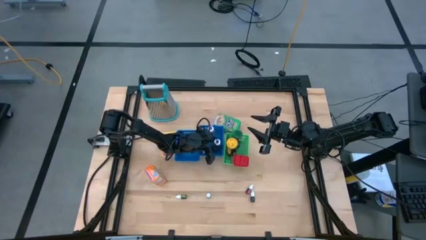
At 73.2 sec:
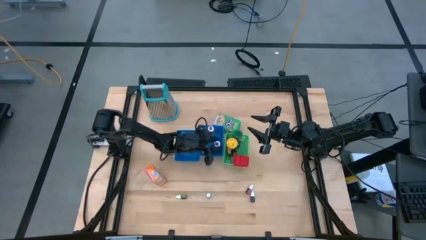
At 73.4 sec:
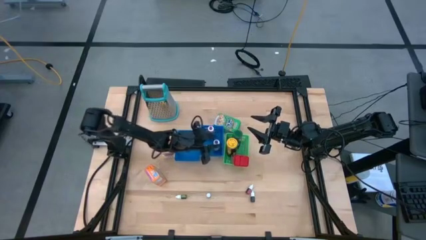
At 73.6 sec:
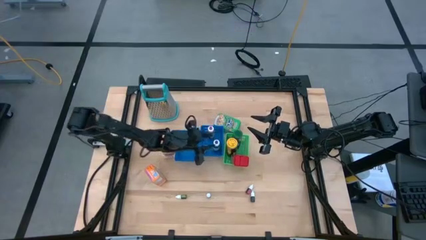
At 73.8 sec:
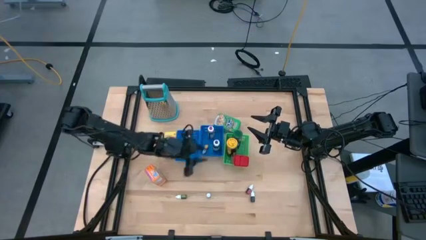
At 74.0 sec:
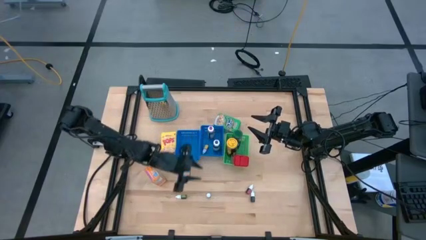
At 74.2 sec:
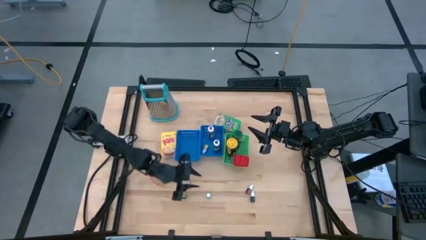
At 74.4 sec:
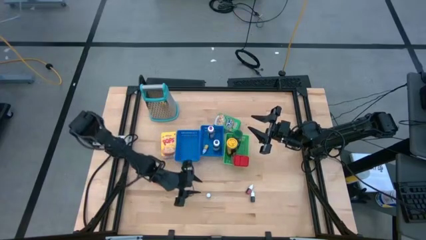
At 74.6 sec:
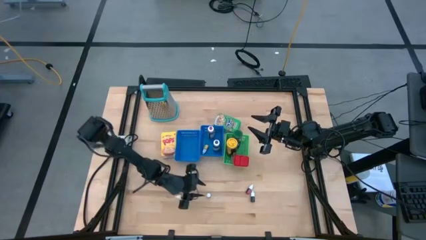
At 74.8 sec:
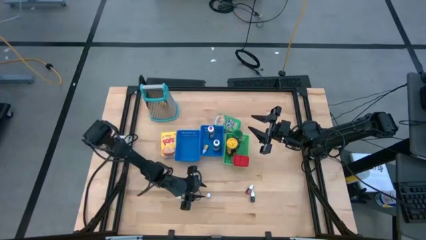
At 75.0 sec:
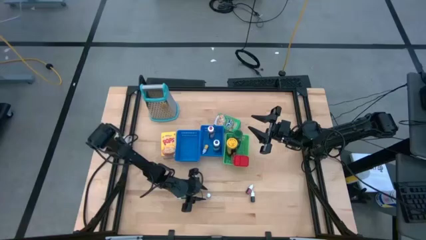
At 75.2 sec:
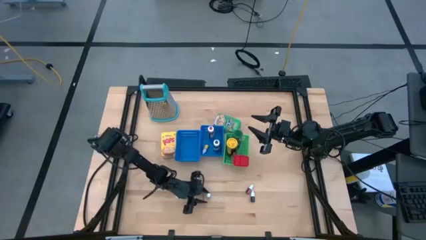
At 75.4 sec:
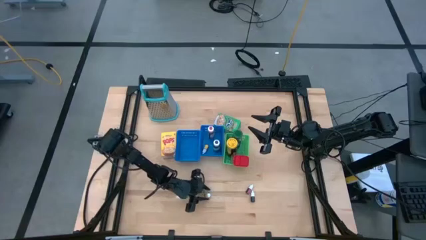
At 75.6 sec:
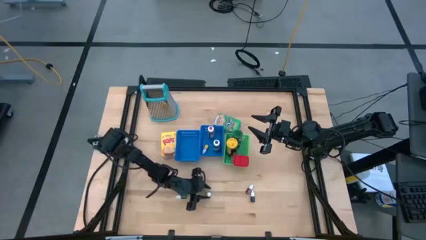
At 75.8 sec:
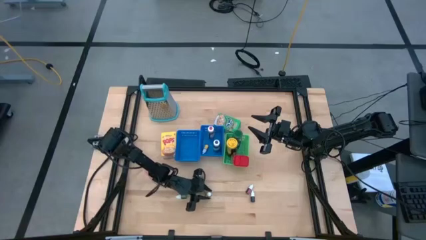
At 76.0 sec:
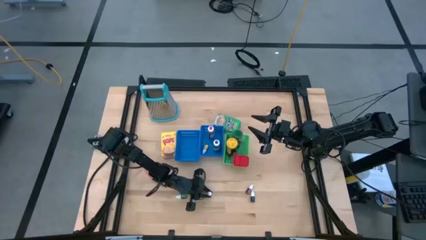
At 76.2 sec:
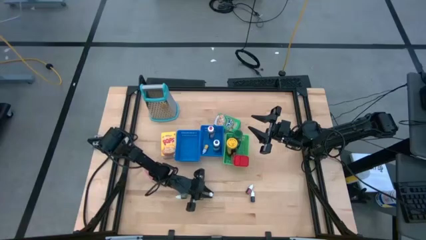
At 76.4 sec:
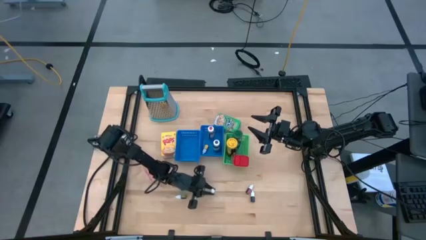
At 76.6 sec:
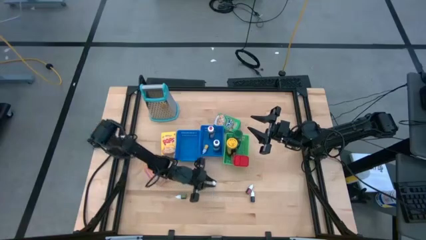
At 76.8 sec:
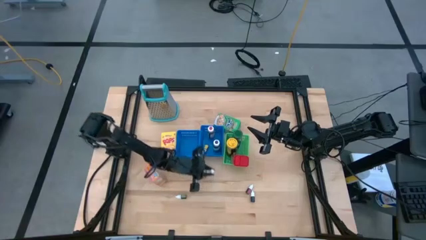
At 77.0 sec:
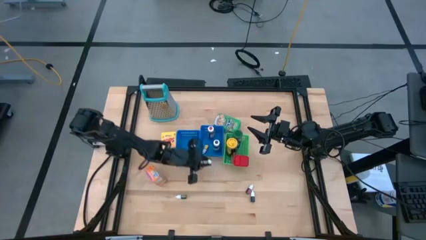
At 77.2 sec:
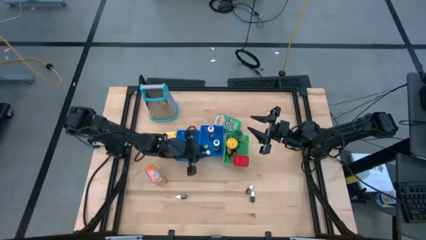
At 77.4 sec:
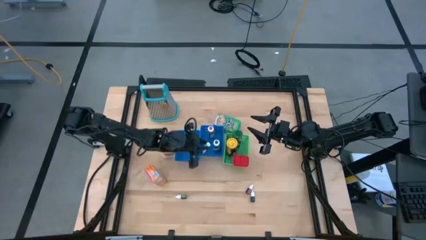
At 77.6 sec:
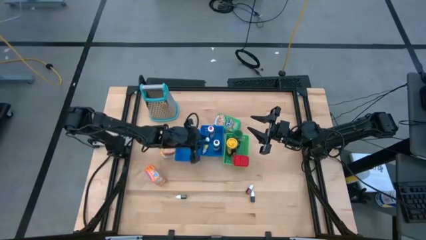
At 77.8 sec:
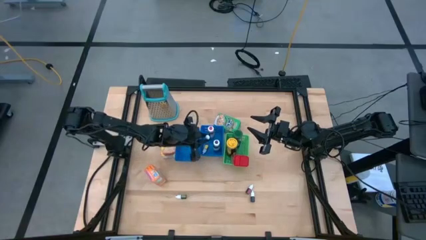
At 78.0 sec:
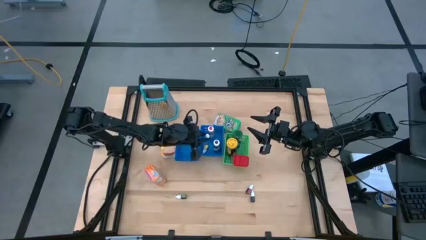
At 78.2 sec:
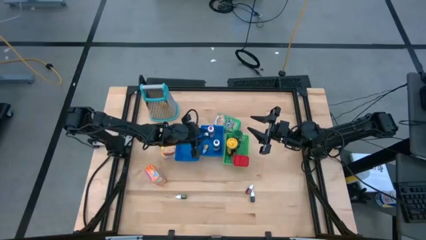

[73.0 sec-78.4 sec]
Task: Pick & Place Kitchen Items
Put the small white food coloring bottle into the right blue bin

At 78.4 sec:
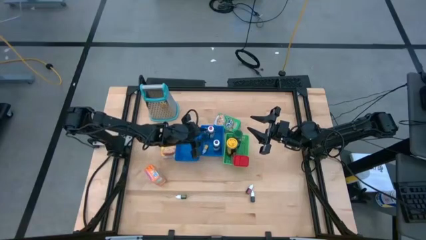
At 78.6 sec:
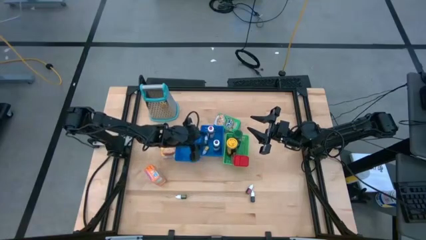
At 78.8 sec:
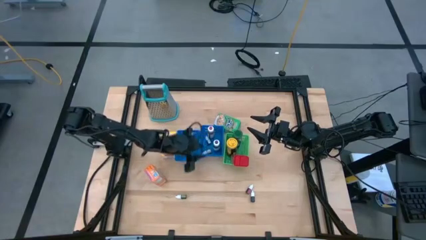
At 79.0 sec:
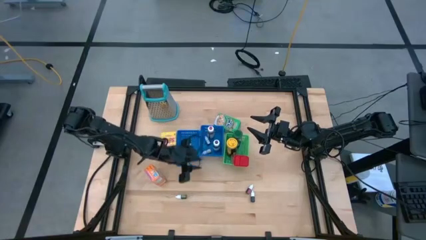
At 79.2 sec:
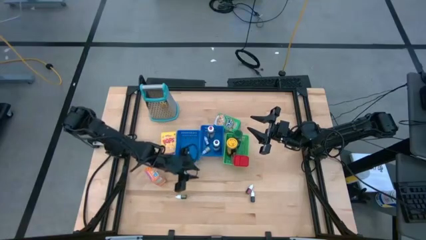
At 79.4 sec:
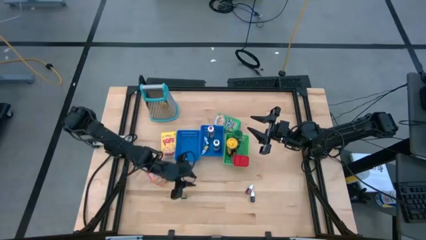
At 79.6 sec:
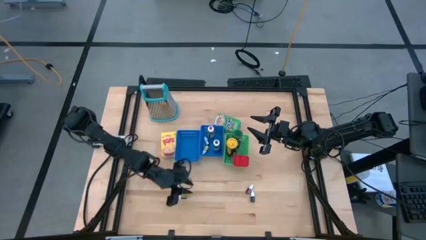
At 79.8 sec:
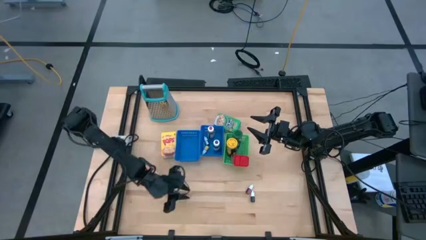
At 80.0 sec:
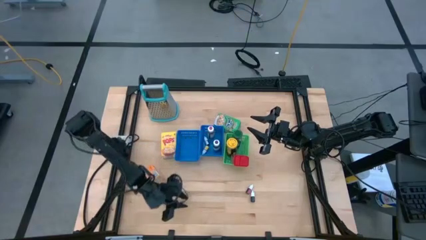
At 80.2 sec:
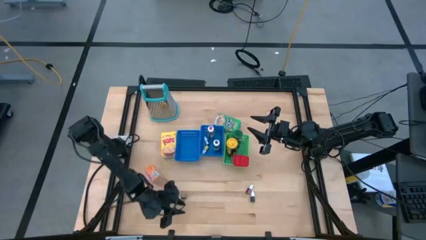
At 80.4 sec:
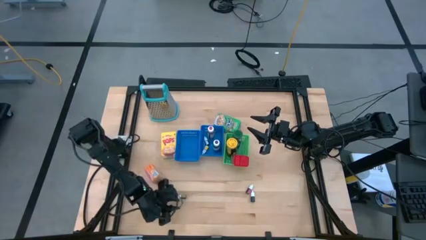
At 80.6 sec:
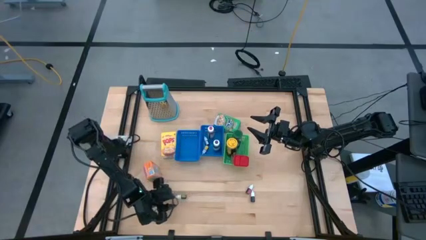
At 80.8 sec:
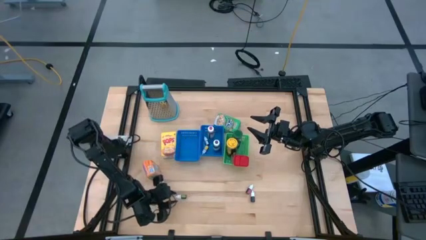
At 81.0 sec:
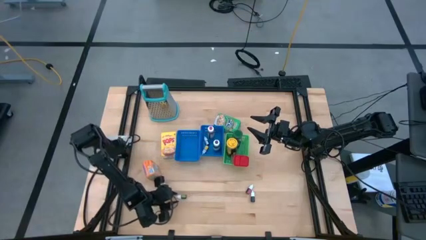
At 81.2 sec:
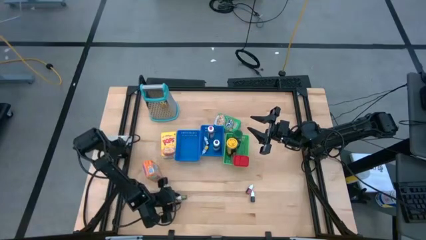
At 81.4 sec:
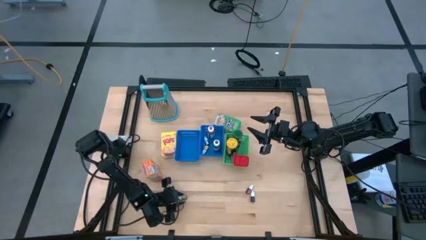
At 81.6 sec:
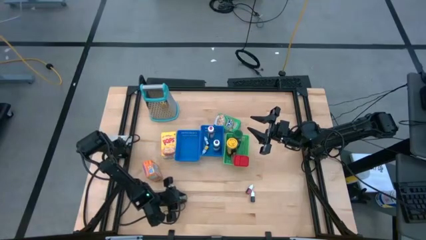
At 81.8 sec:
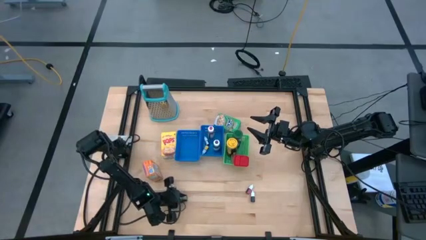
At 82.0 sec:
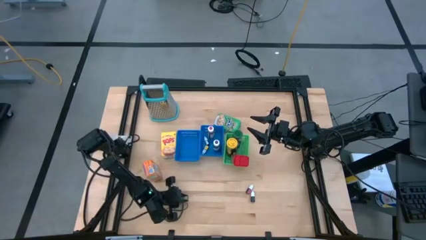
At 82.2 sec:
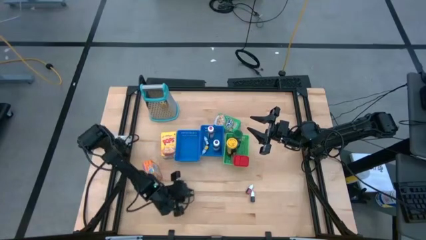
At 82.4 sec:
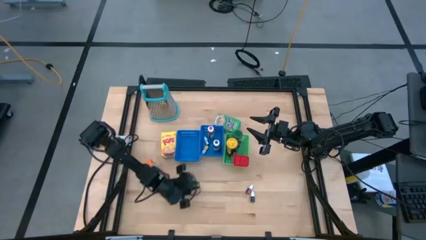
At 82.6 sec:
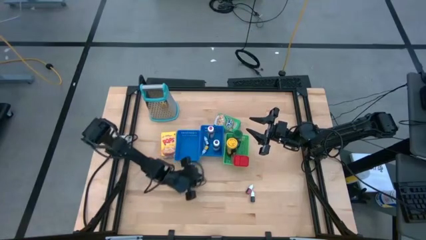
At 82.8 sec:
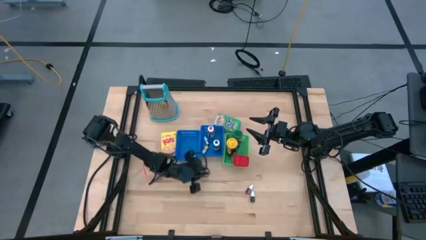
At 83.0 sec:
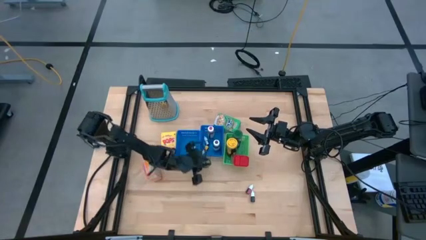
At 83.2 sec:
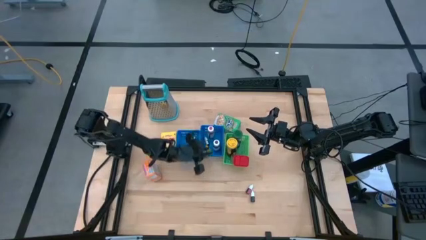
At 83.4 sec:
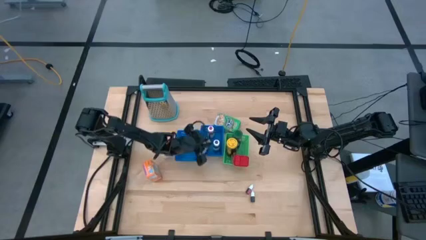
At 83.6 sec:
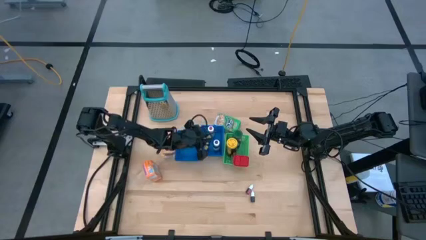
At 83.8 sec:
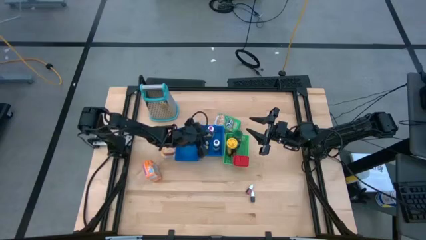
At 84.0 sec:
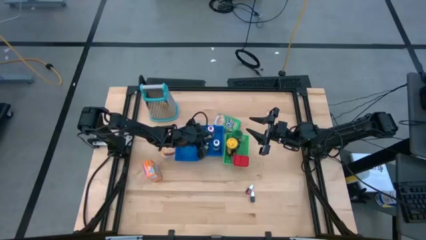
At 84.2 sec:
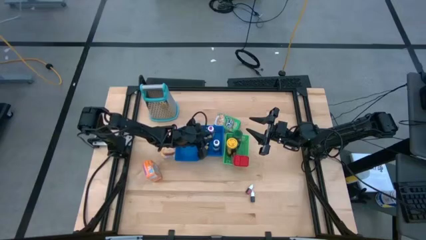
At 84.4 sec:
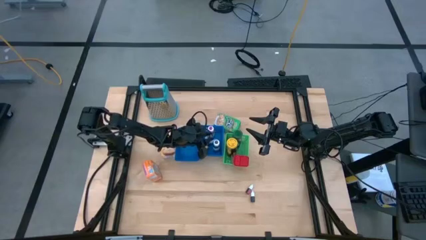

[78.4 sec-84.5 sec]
Put the small green food coloring bottle into the right blue bin

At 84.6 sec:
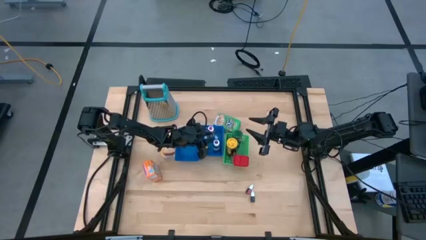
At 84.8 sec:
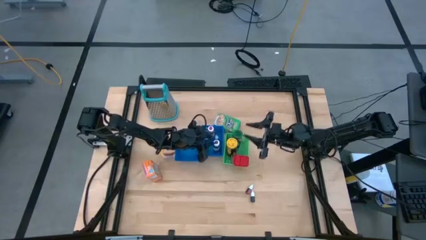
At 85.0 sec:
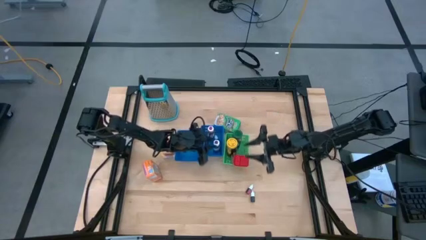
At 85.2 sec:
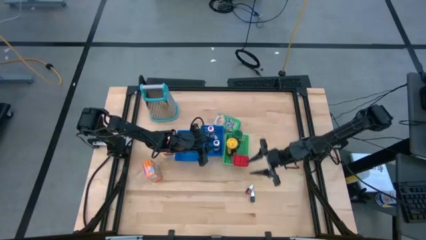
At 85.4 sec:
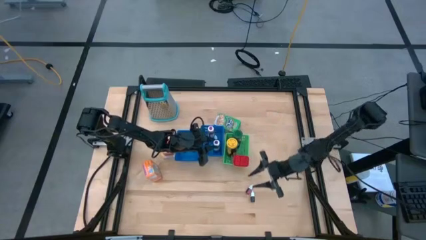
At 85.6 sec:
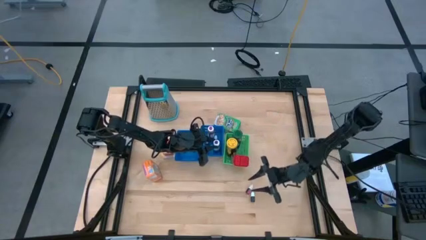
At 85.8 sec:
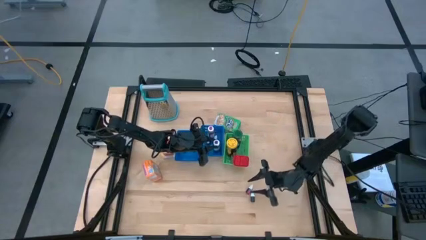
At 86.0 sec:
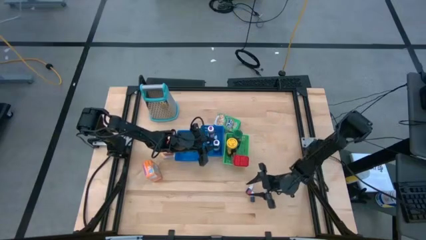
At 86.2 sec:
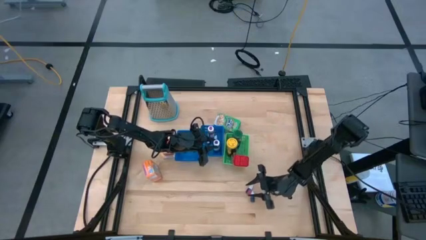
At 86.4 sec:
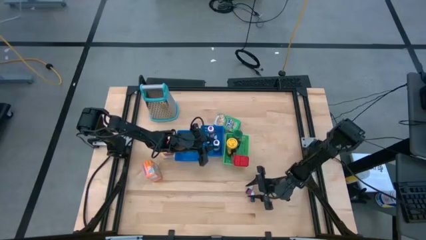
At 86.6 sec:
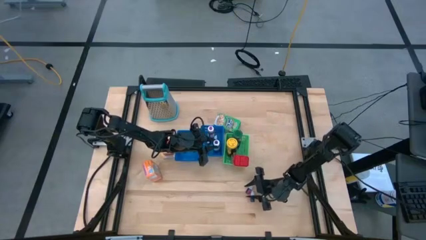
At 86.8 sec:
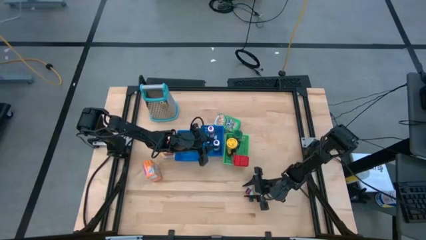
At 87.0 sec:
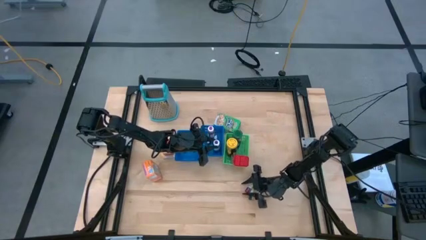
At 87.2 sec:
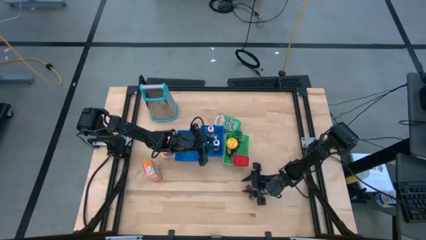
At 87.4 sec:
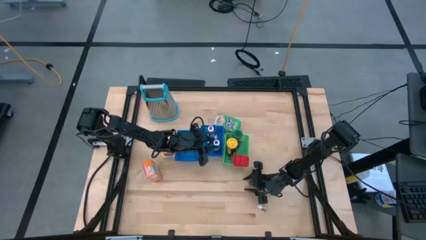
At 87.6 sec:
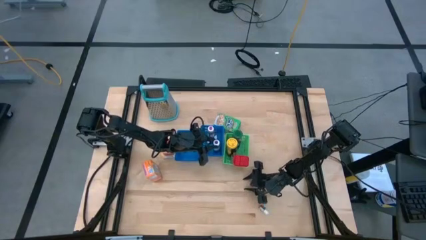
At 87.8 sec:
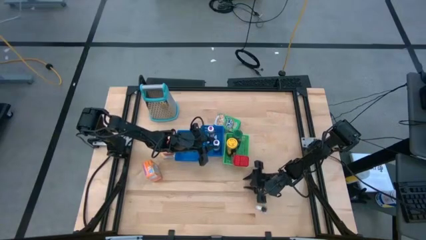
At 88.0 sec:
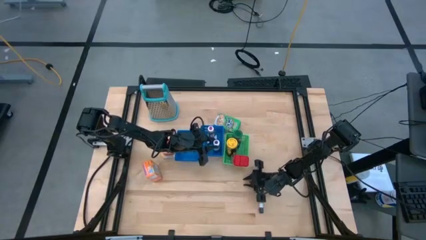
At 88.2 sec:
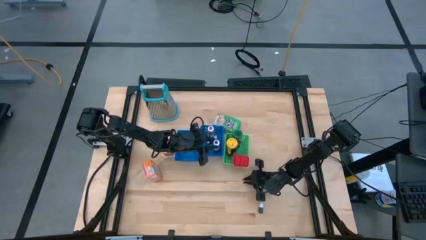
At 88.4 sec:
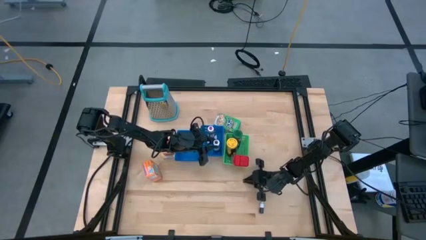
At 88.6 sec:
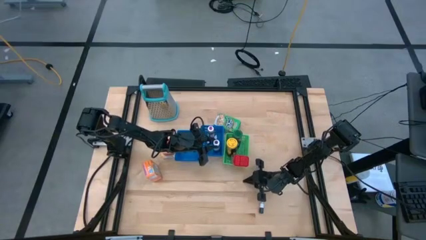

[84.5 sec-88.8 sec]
Put the small pink food coloring bottle into the right blue bin
